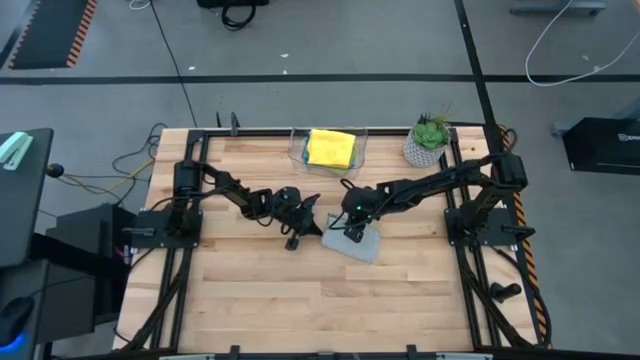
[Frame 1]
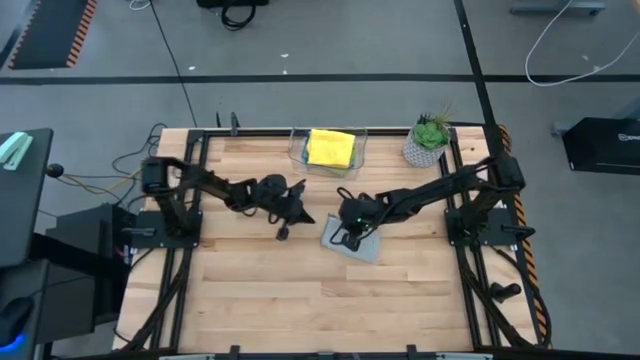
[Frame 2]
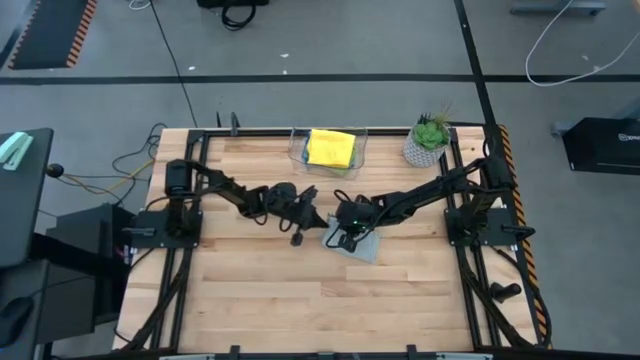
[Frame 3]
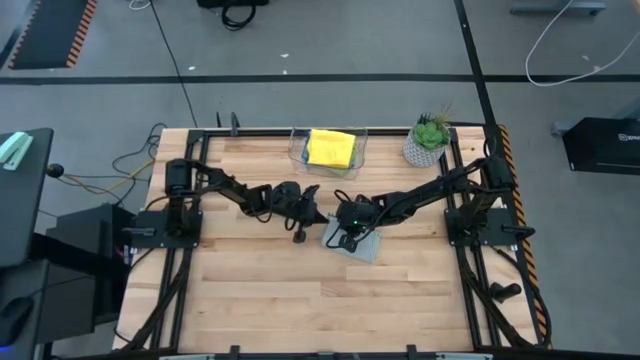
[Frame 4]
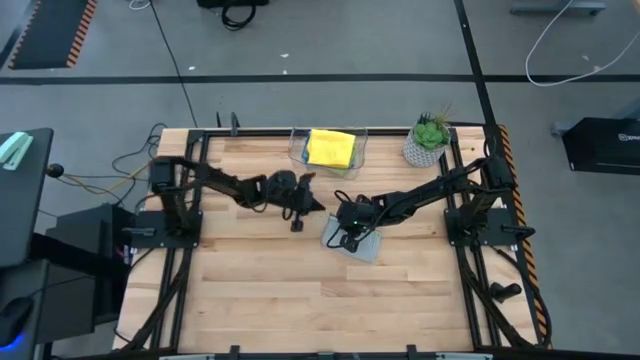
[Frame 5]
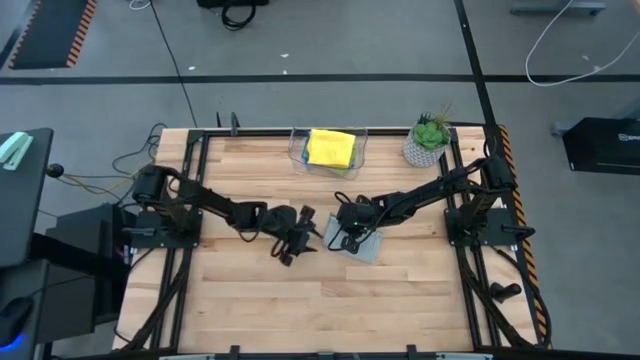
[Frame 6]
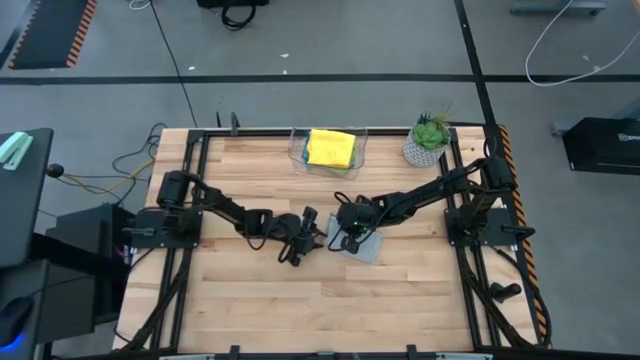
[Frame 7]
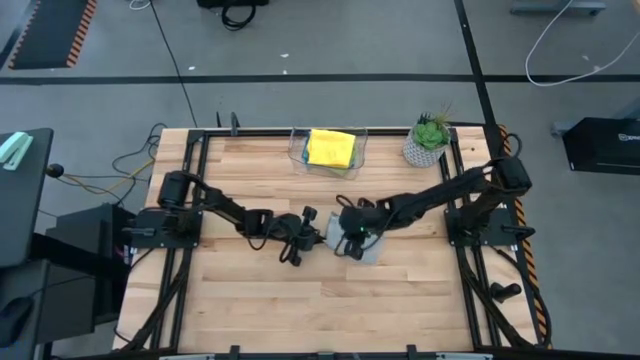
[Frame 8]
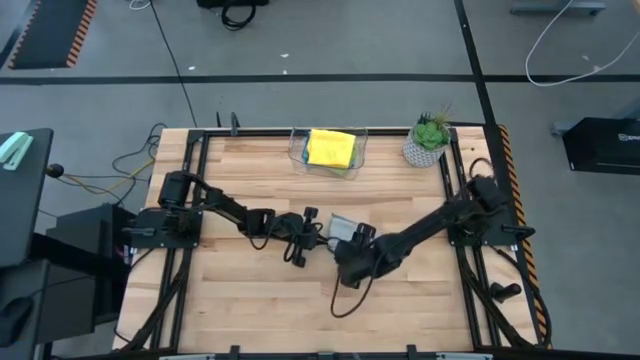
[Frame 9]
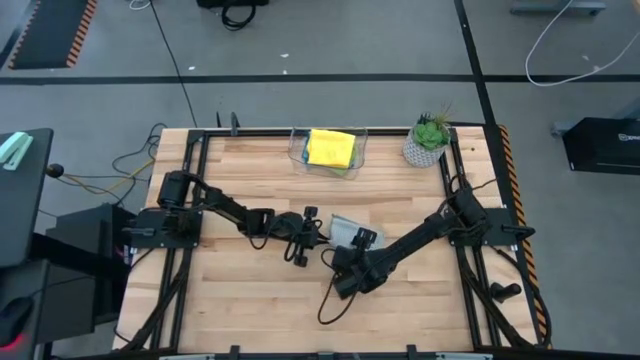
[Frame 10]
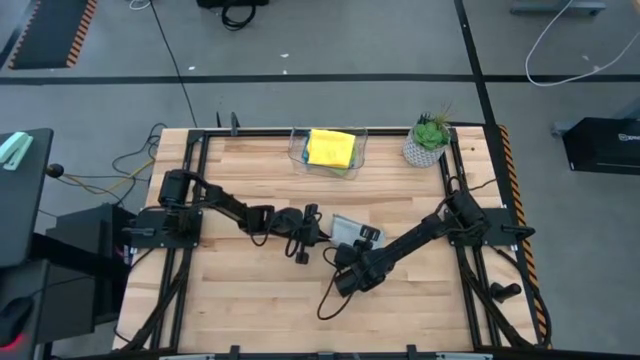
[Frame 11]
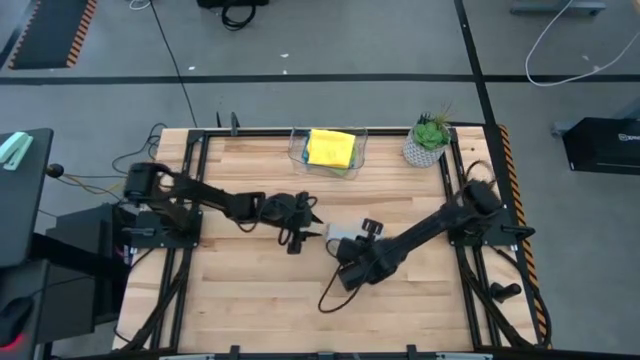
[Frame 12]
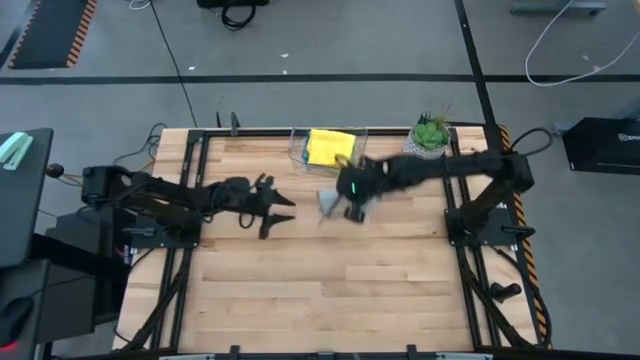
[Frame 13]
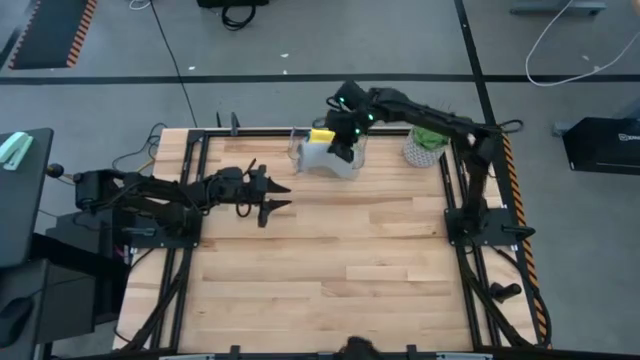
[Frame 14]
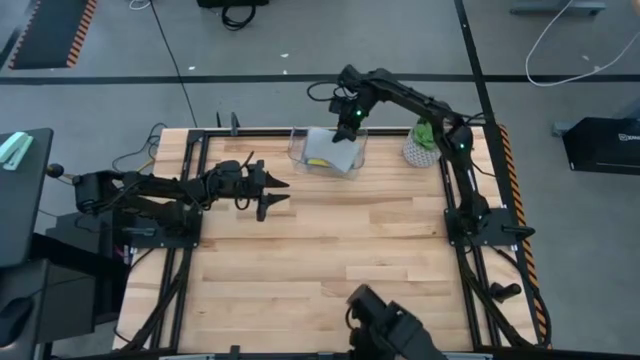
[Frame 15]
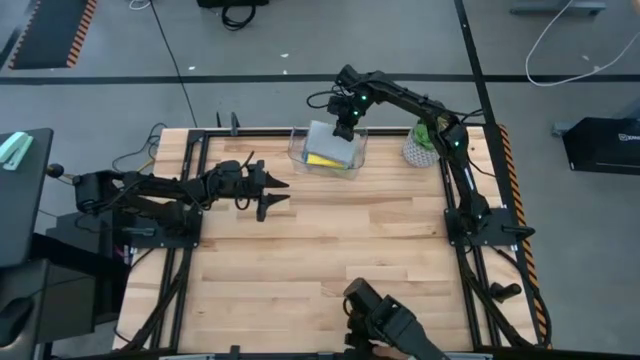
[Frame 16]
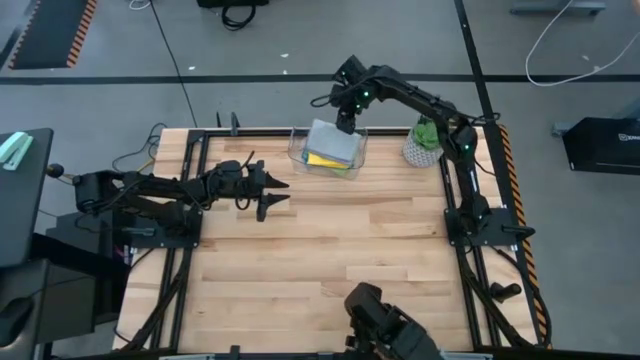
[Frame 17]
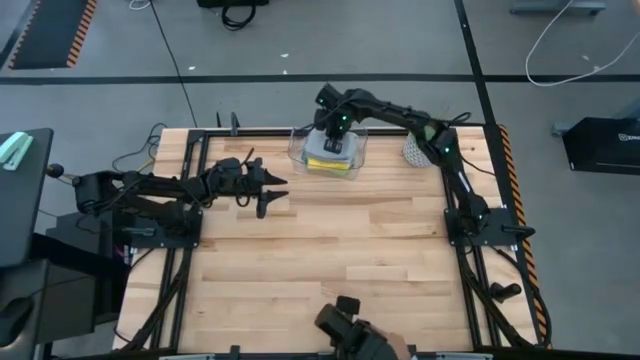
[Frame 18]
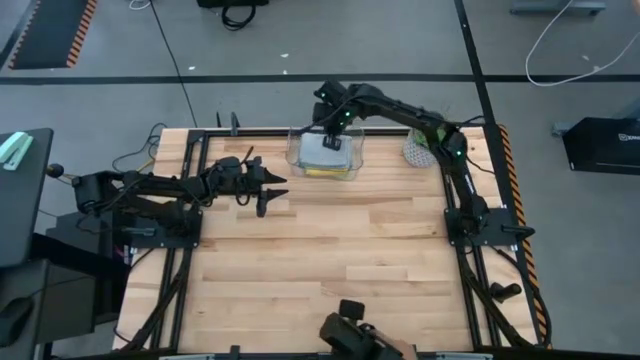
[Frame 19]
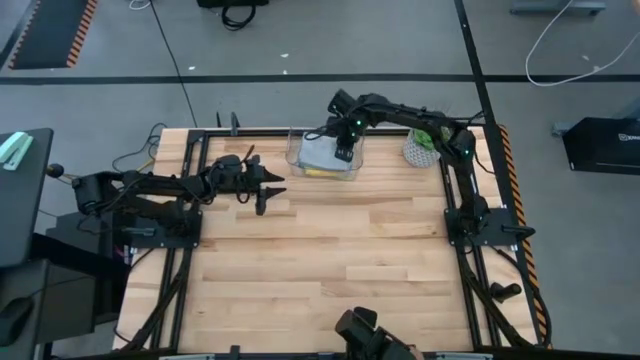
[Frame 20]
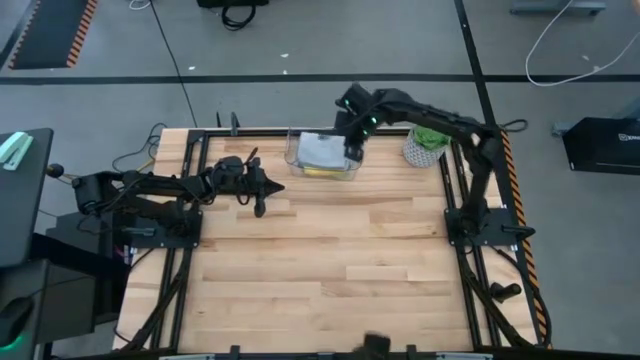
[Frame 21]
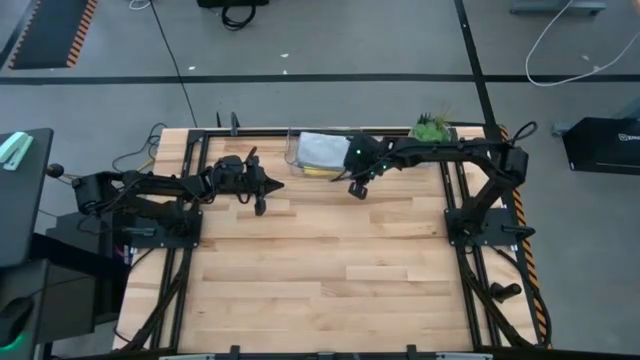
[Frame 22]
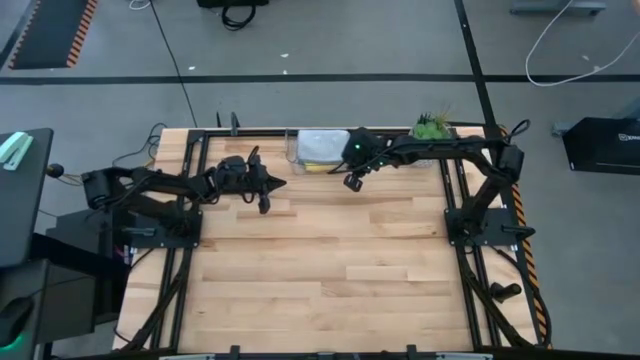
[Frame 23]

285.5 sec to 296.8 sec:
Task: Fold microfiber towels
Put the folded gray microfiber towel into the transparent bin

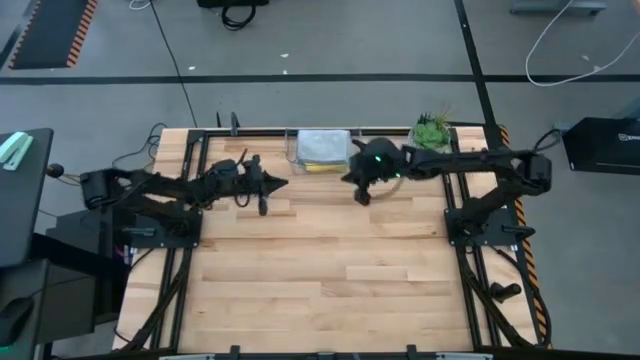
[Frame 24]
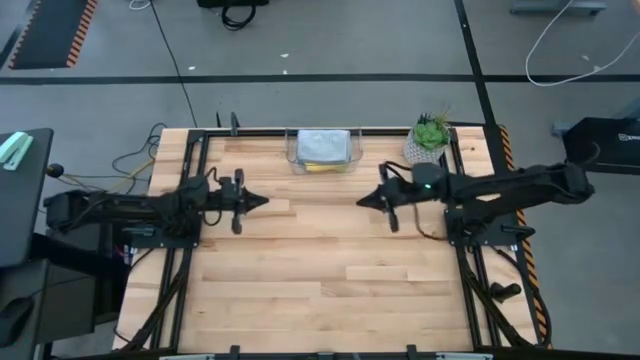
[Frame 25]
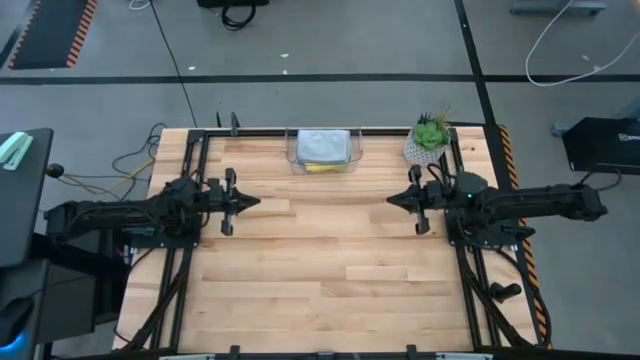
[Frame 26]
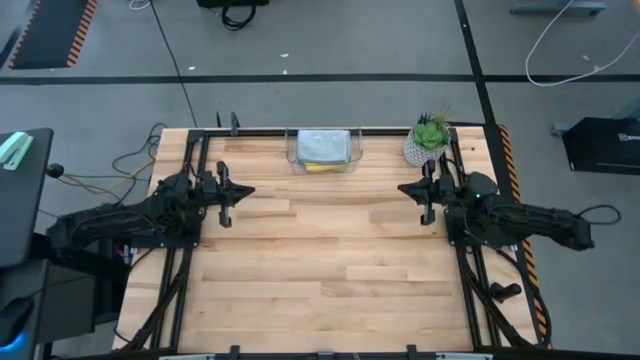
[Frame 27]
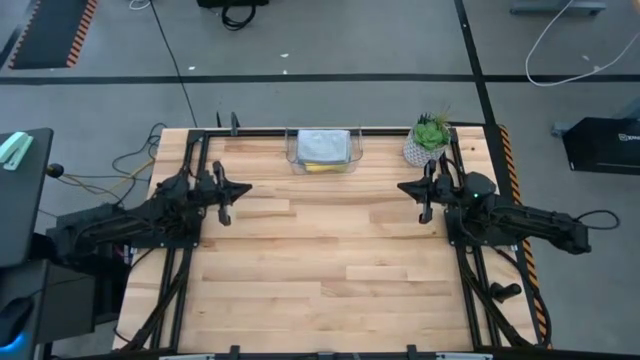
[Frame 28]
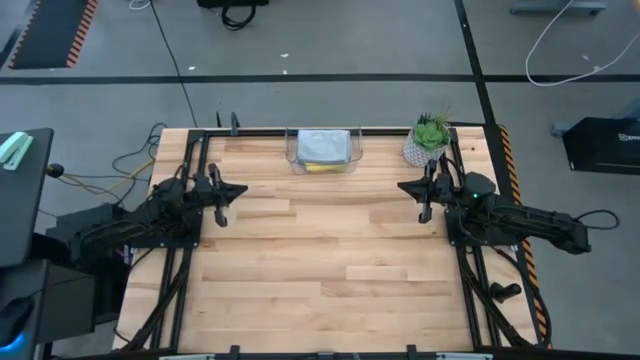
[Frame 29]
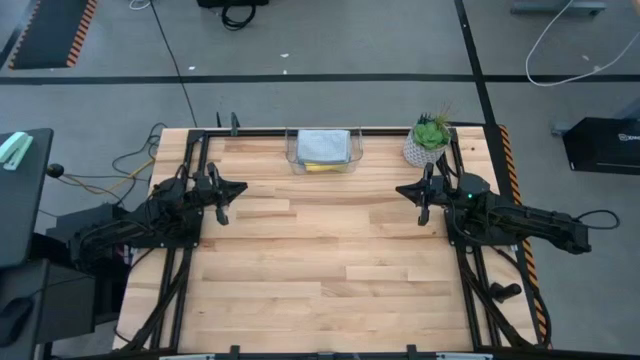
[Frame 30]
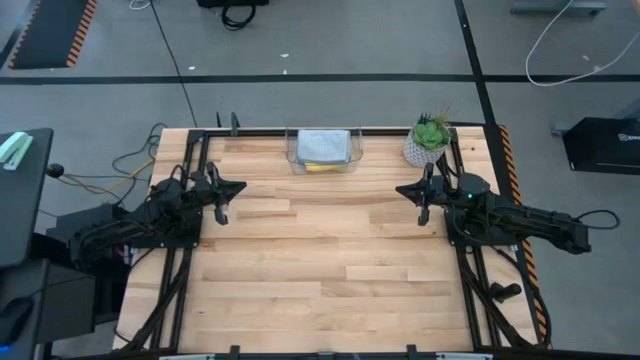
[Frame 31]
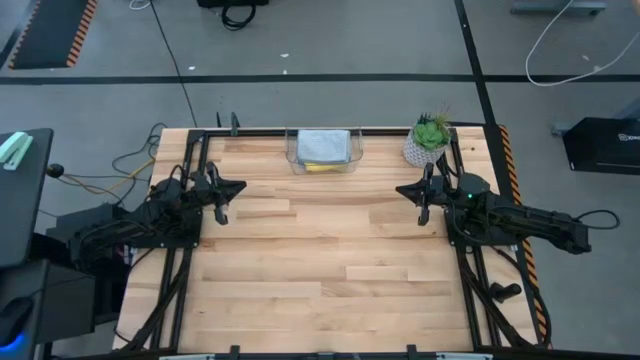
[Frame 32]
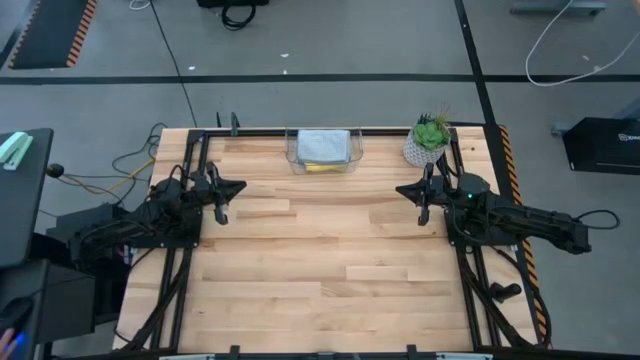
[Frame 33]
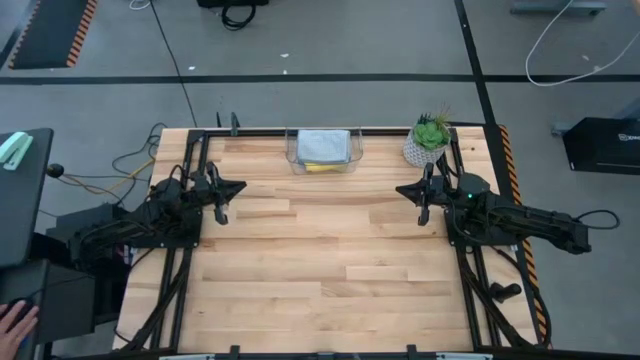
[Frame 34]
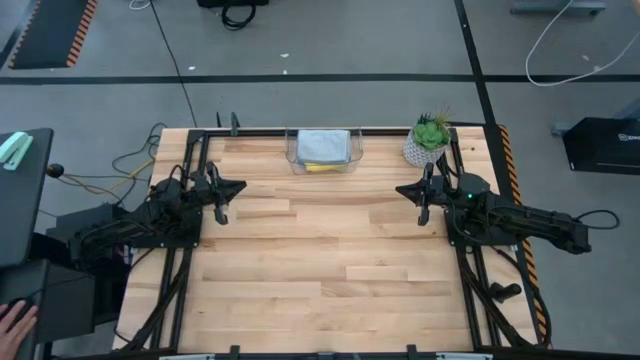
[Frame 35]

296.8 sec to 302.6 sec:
Return to Home Position
